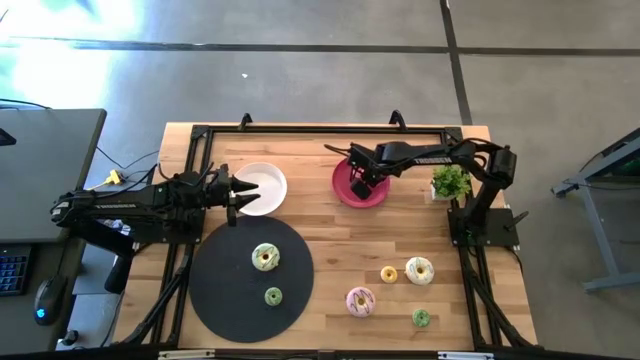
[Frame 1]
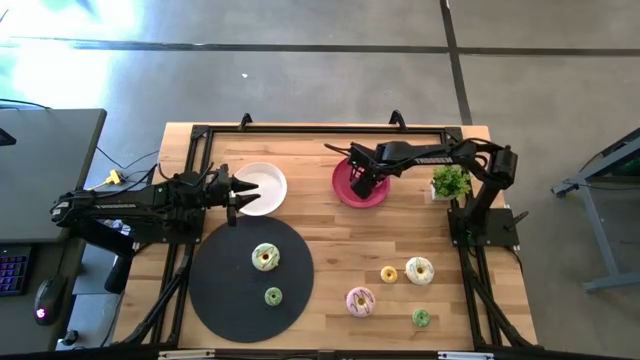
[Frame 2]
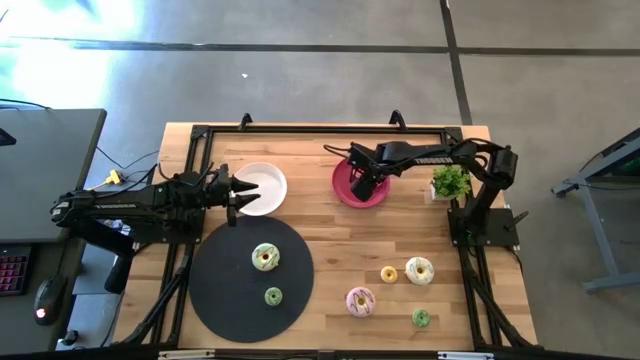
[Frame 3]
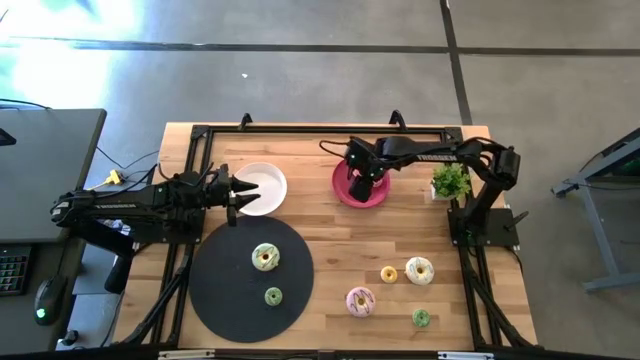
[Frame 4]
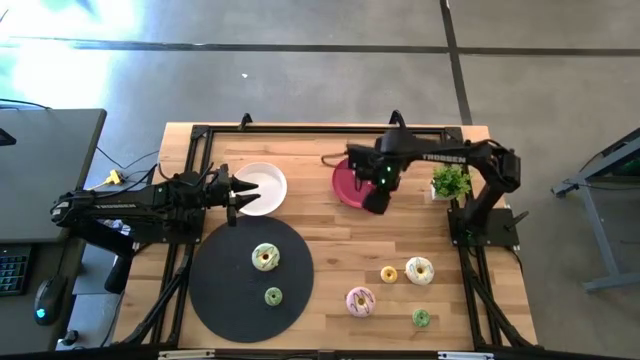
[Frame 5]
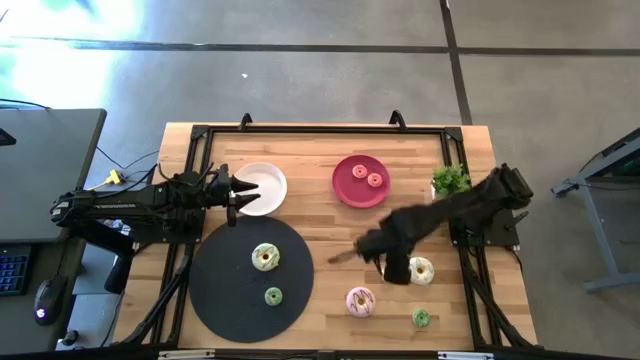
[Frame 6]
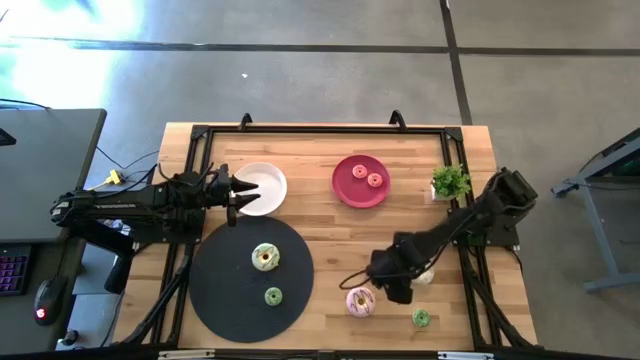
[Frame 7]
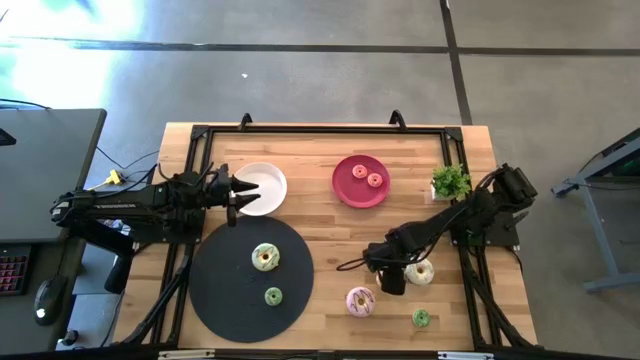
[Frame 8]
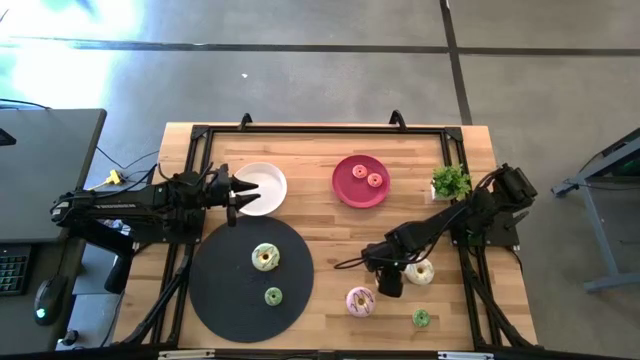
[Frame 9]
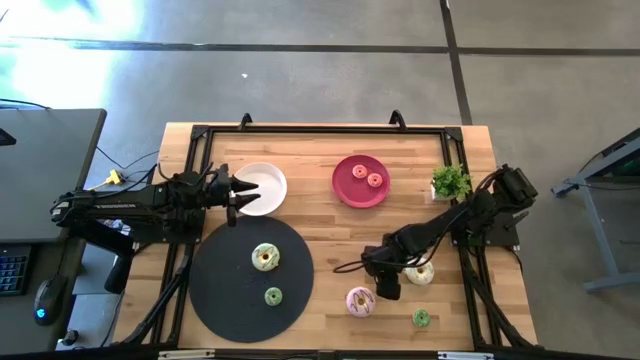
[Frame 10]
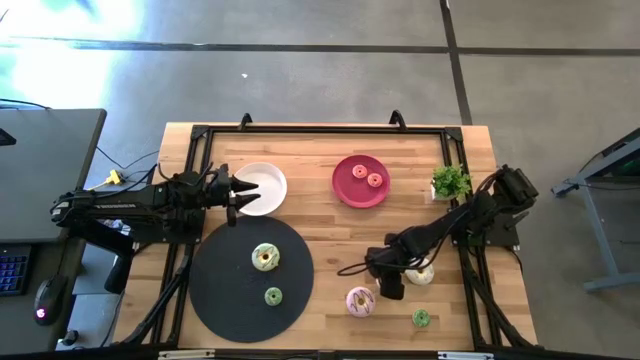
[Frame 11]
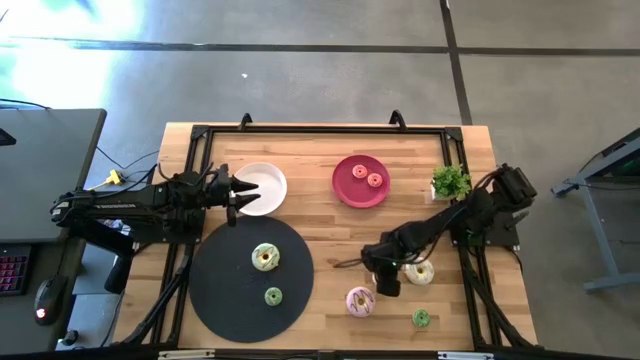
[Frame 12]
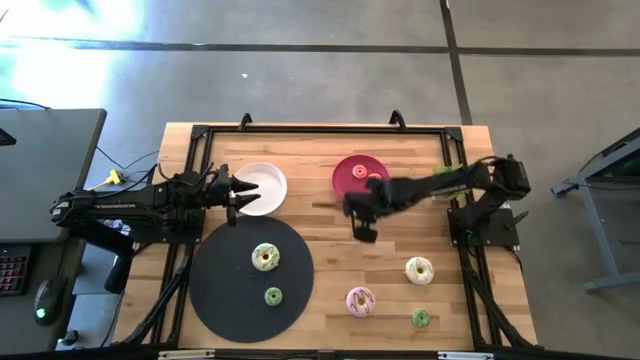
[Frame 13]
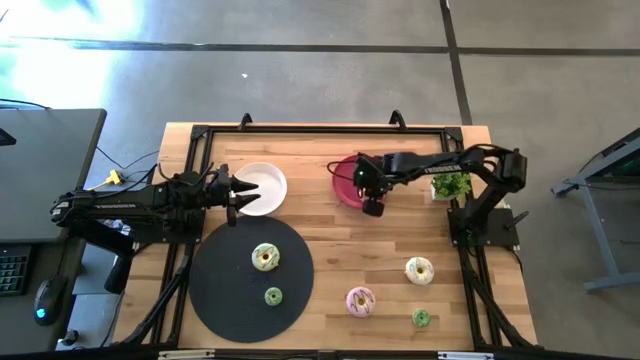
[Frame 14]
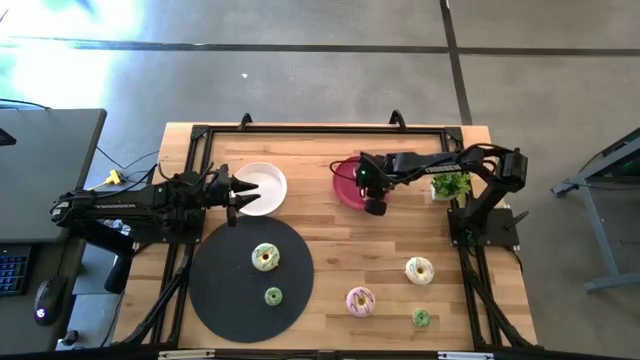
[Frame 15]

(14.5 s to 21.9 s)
Task: Pick & Place donuts
Put the small yellow donut on the pink plate

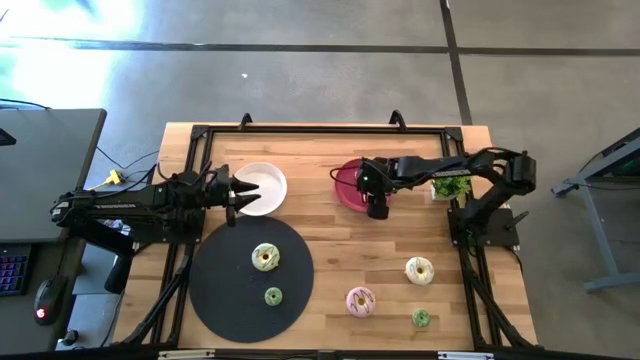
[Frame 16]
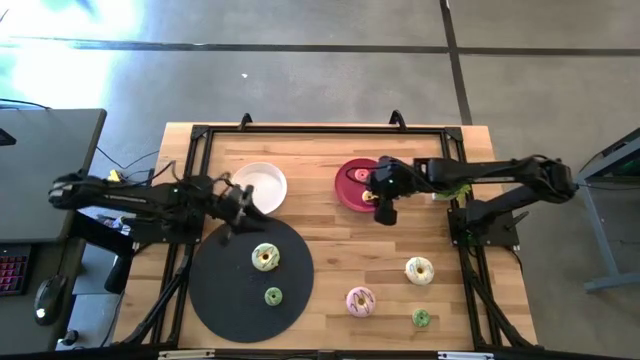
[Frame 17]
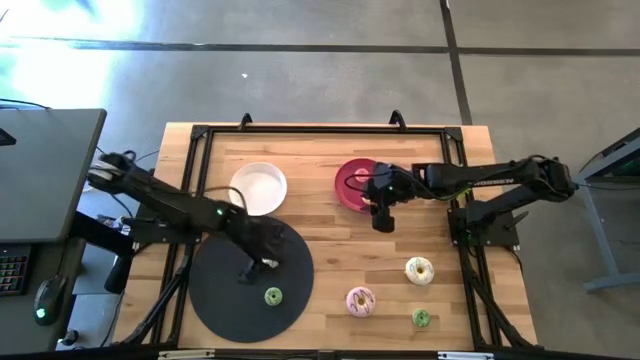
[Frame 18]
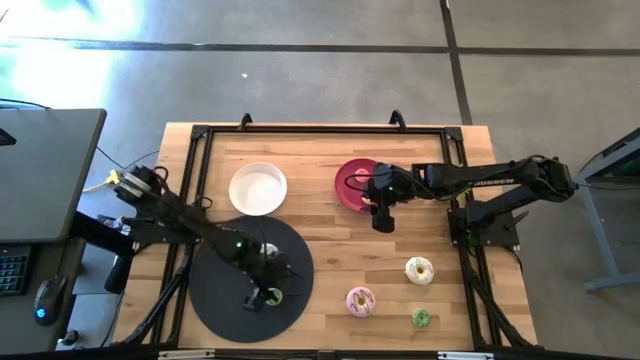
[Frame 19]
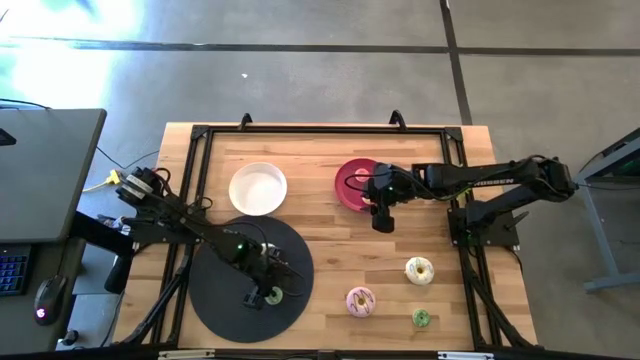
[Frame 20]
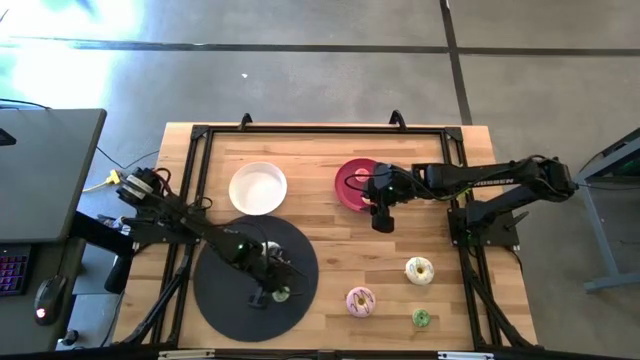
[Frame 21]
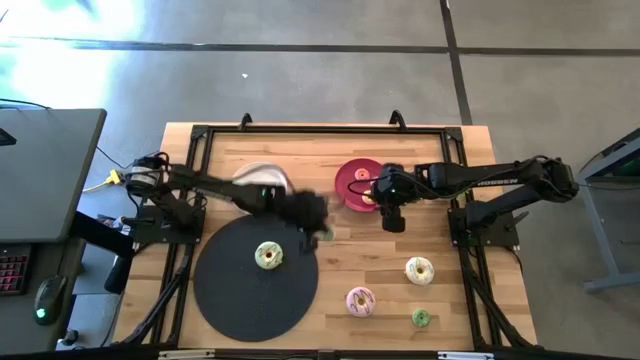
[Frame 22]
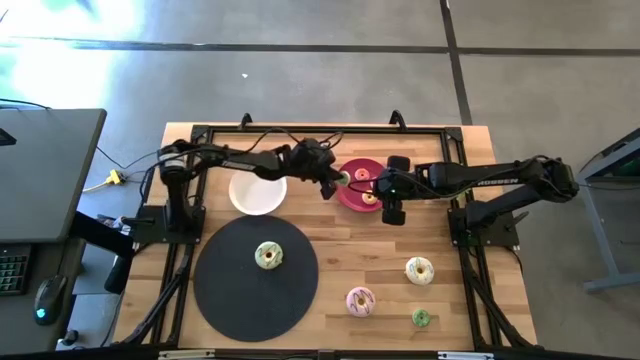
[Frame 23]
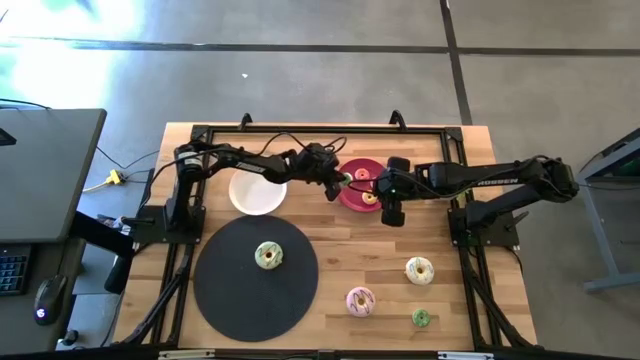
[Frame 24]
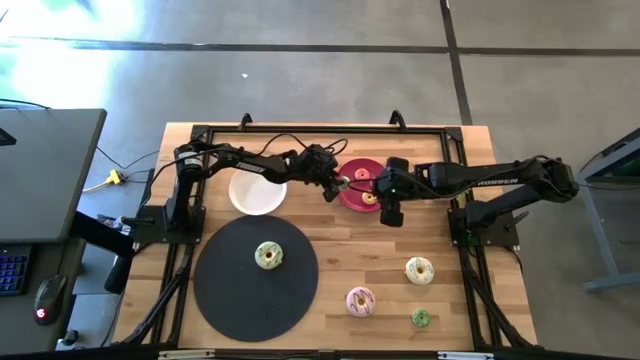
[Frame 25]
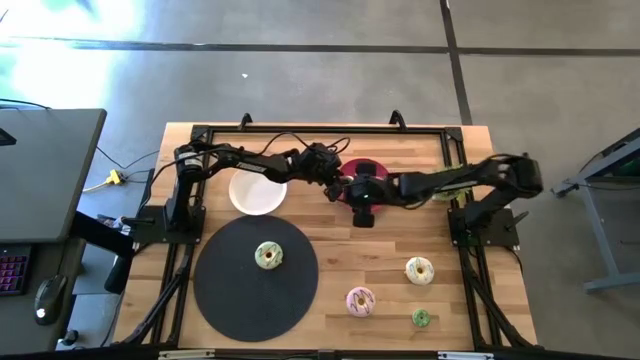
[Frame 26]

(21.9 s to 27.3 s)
Put the left small green donut on the pink plate

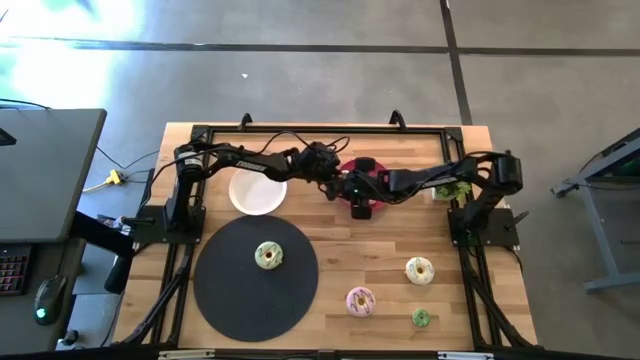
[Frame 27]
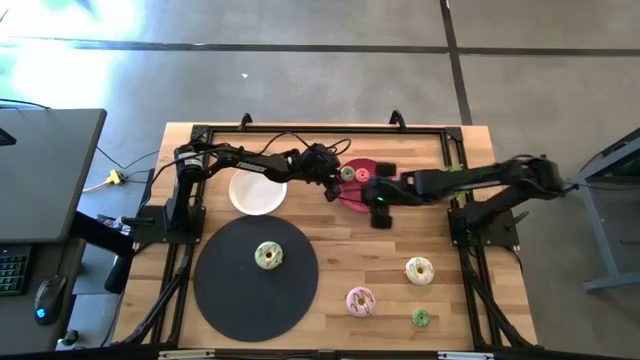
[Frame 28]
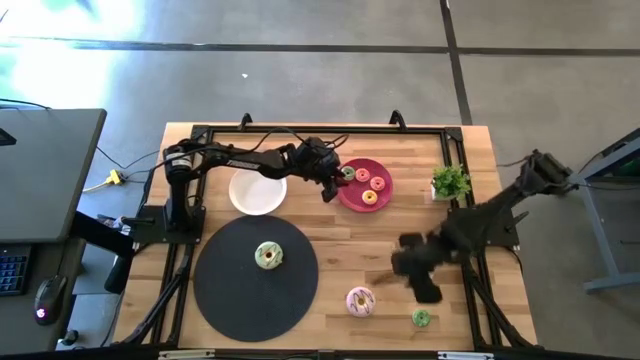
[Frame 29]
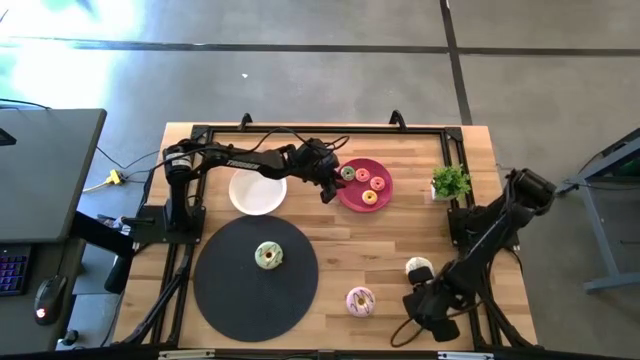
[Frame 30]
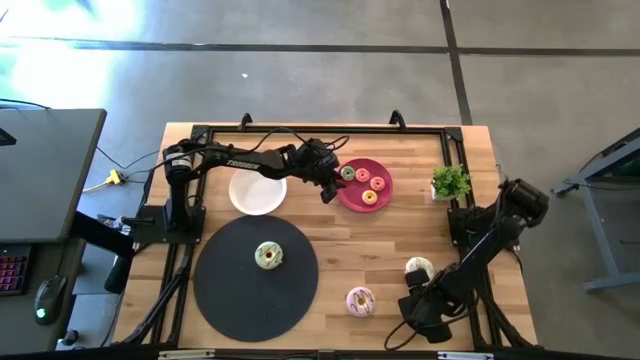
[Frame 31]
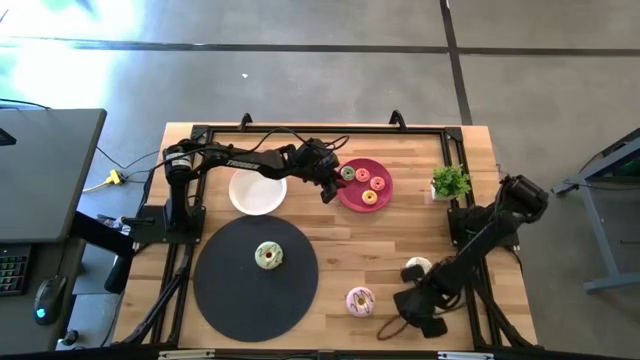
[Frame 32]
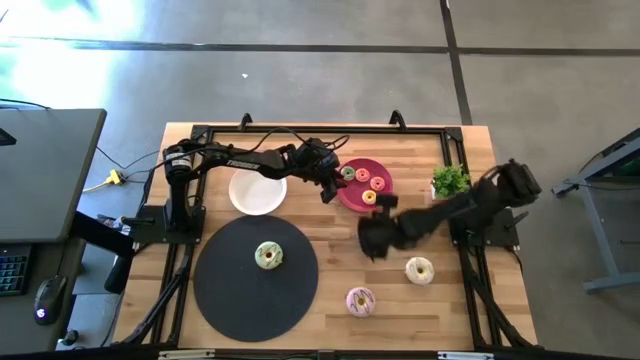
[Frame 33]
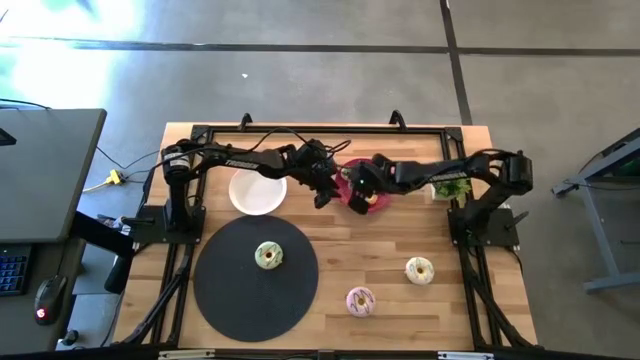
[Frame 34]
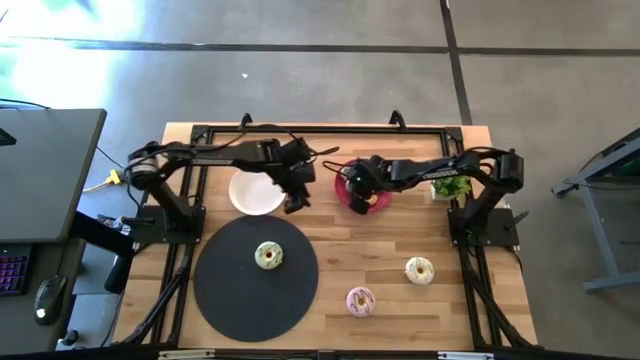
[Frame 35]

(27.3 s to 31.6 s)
Put the small green donut on the pink plate

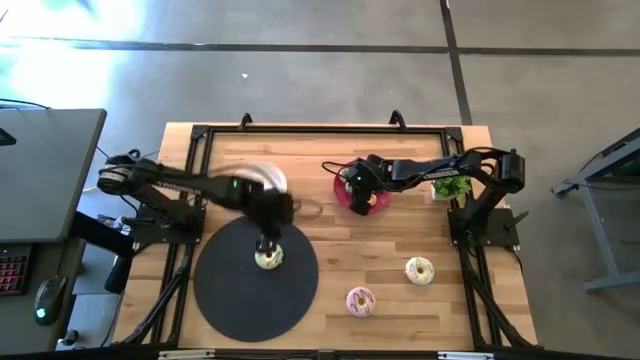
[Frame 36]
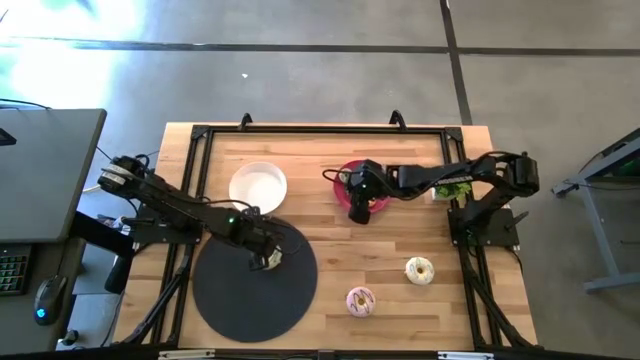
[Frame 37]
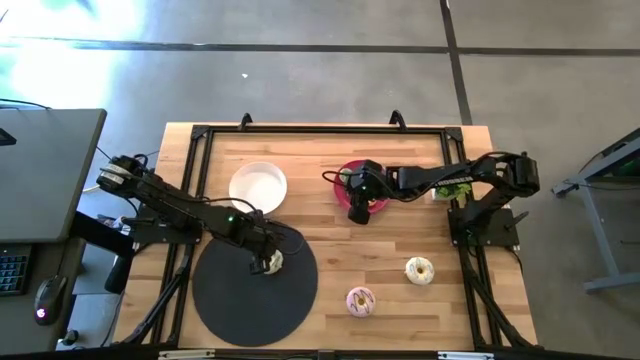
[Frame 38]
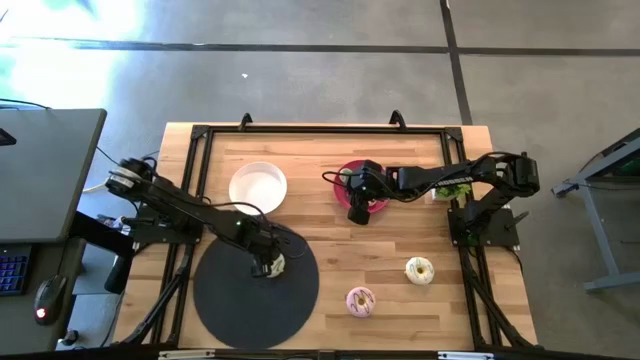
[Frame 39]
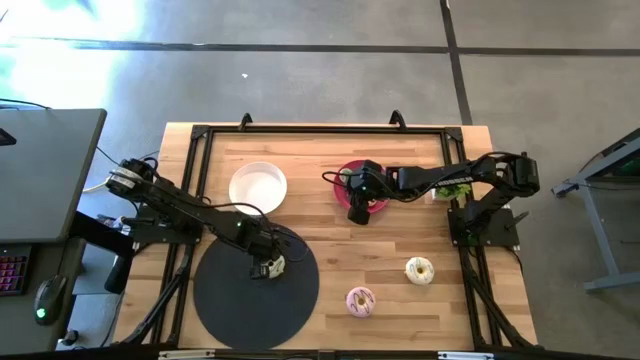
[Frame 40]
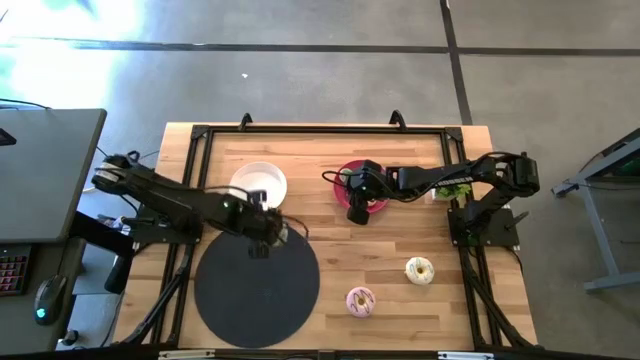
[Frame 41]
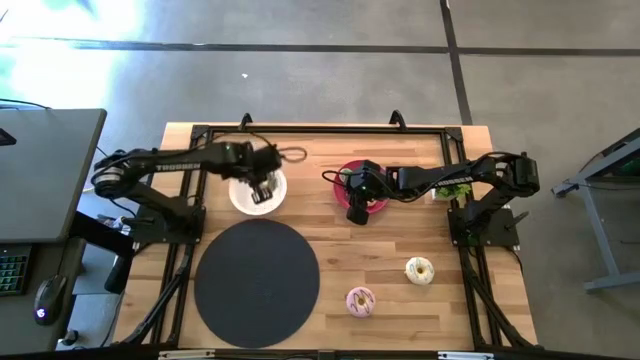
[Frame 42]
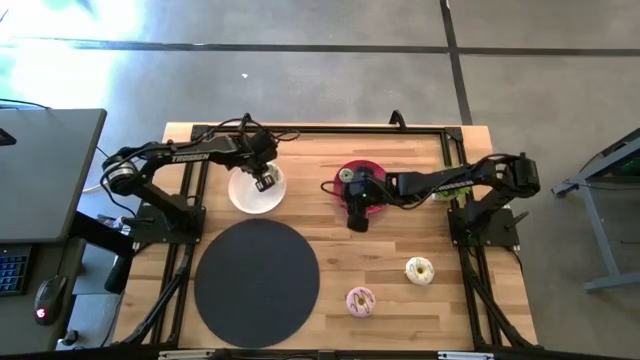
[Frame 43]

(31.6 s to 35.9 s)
Put the large light blue donut on the white plate
